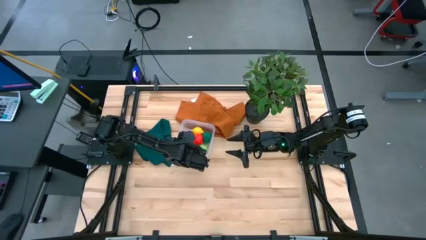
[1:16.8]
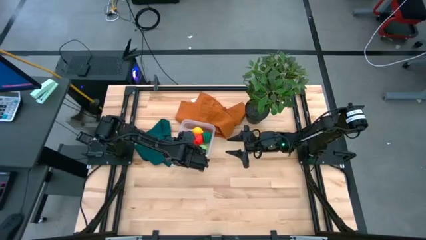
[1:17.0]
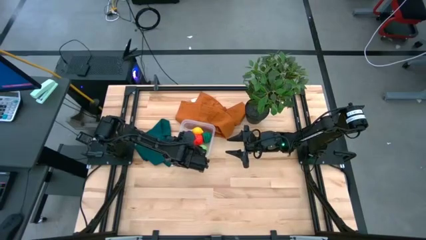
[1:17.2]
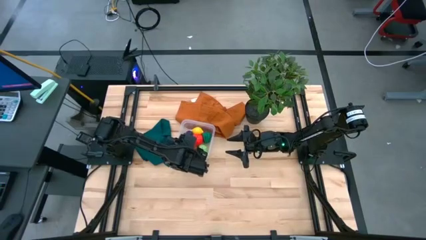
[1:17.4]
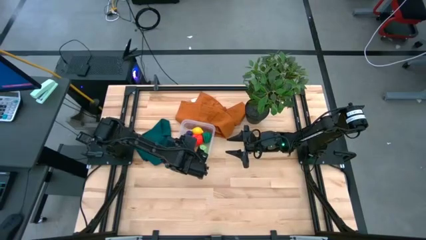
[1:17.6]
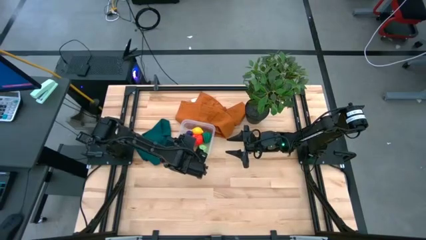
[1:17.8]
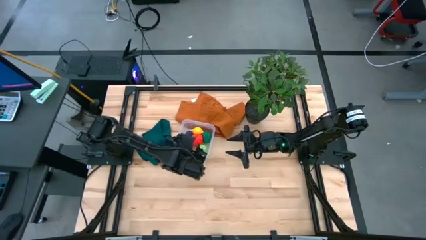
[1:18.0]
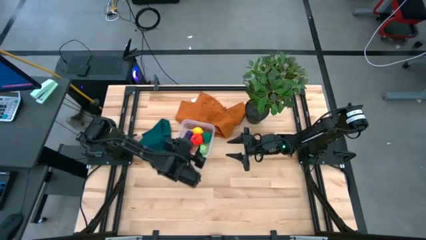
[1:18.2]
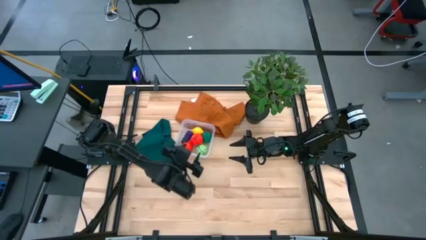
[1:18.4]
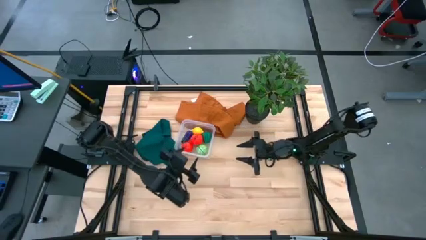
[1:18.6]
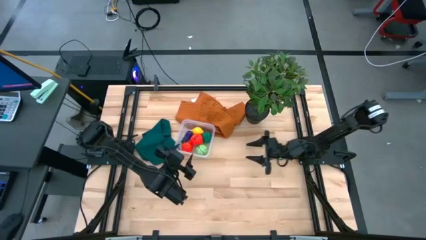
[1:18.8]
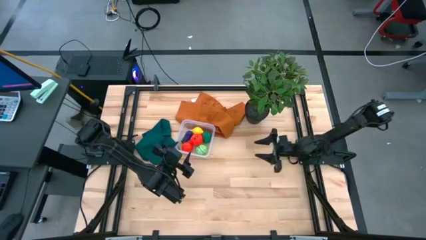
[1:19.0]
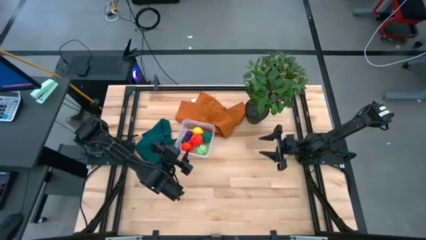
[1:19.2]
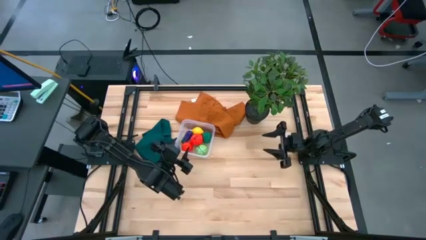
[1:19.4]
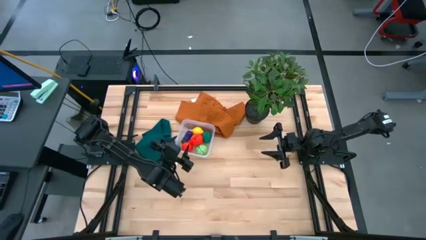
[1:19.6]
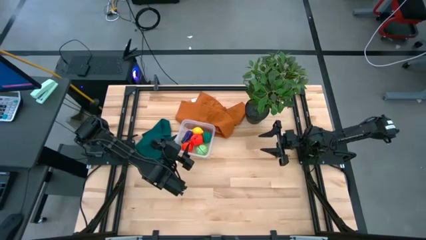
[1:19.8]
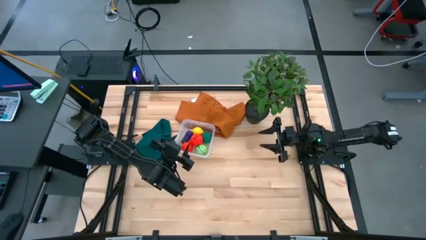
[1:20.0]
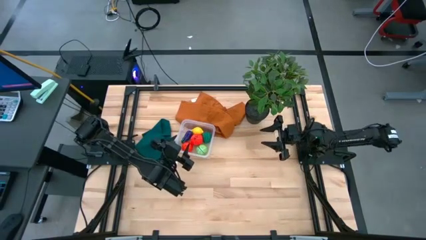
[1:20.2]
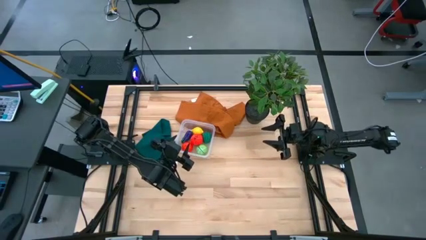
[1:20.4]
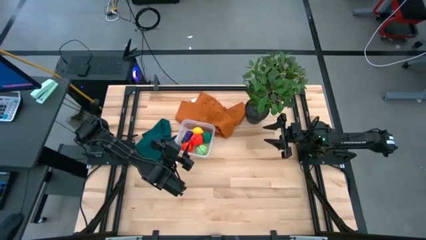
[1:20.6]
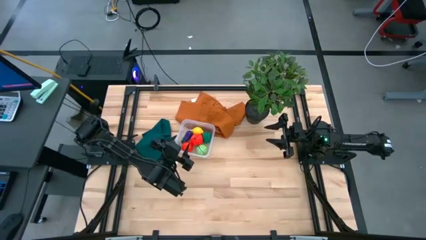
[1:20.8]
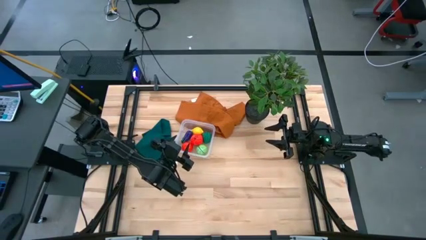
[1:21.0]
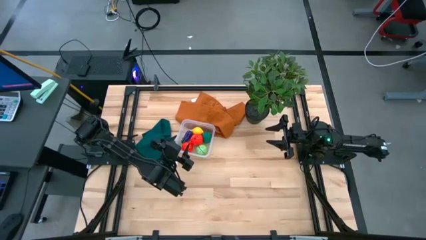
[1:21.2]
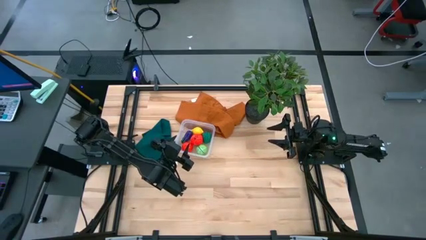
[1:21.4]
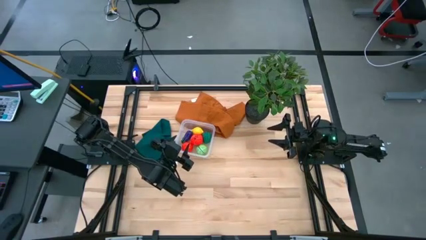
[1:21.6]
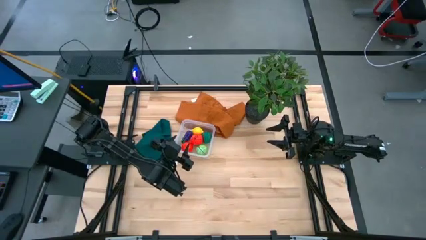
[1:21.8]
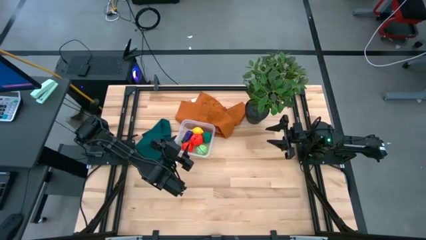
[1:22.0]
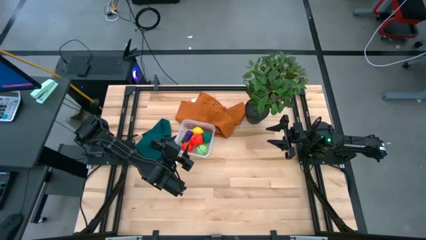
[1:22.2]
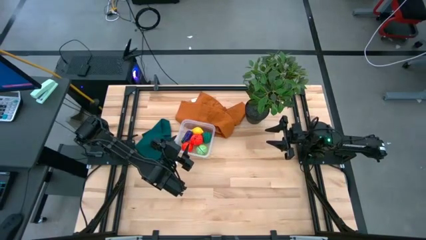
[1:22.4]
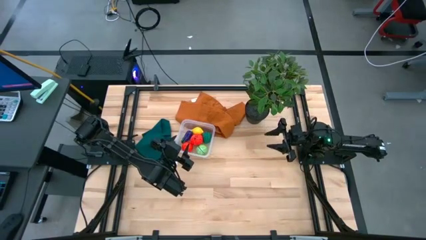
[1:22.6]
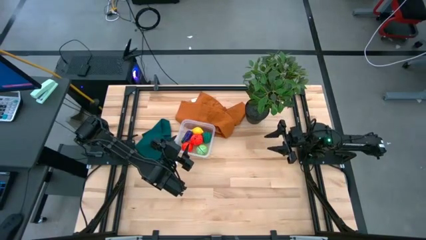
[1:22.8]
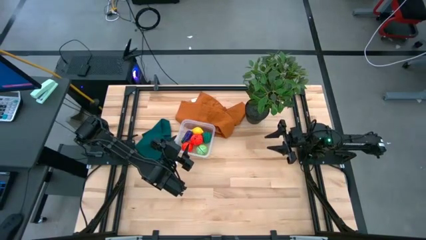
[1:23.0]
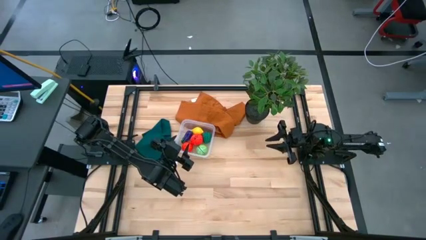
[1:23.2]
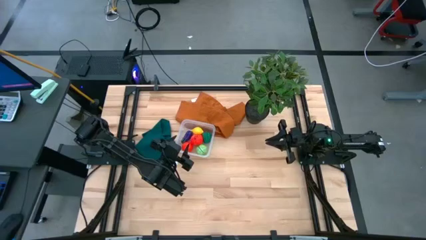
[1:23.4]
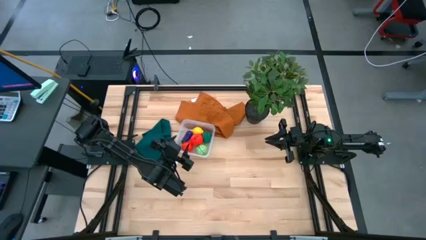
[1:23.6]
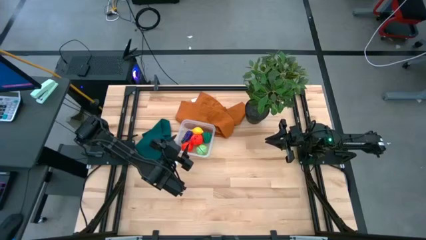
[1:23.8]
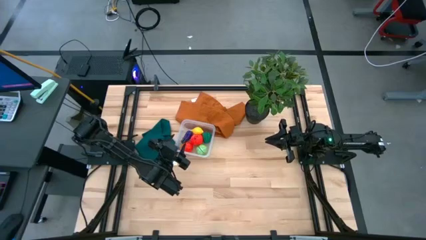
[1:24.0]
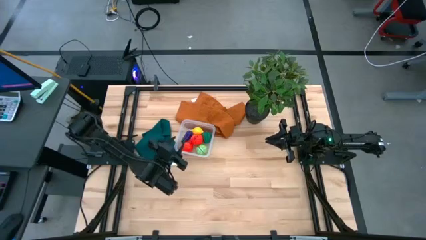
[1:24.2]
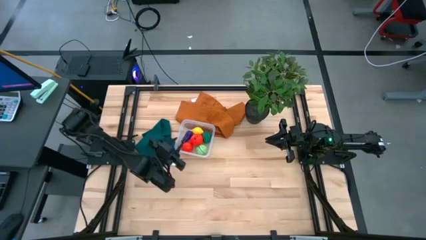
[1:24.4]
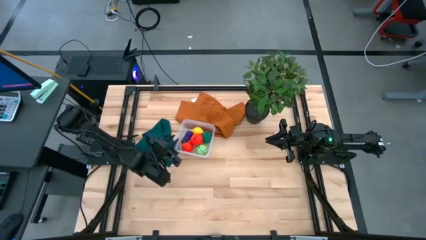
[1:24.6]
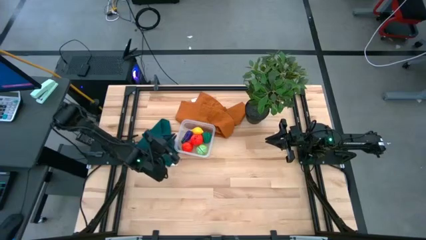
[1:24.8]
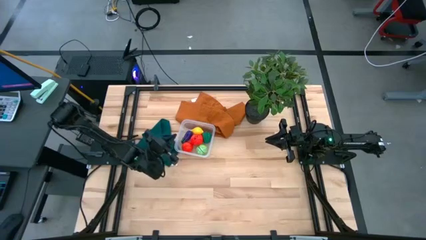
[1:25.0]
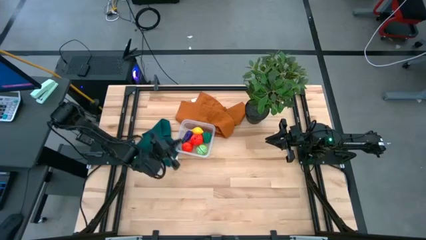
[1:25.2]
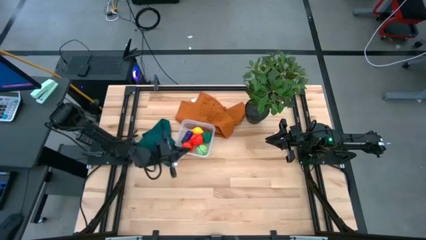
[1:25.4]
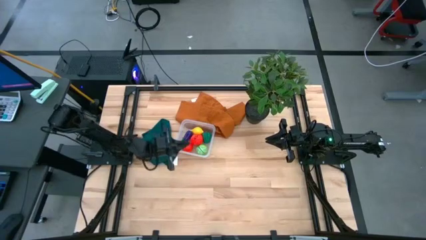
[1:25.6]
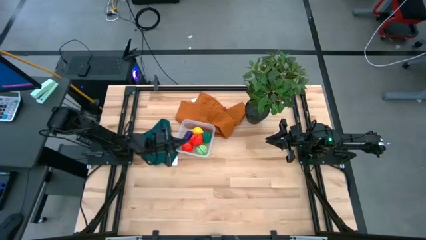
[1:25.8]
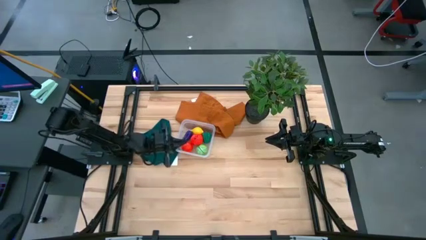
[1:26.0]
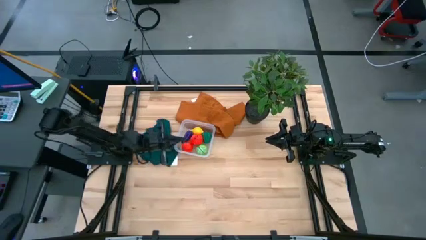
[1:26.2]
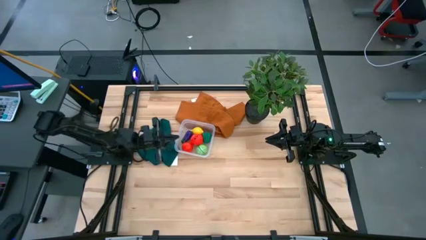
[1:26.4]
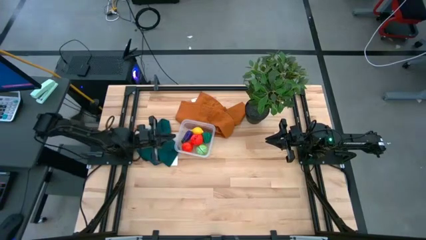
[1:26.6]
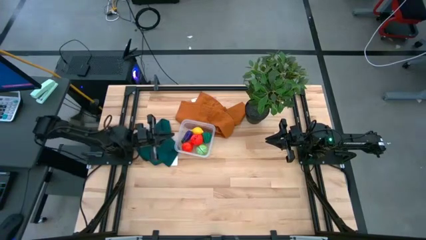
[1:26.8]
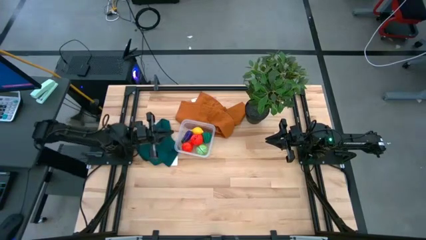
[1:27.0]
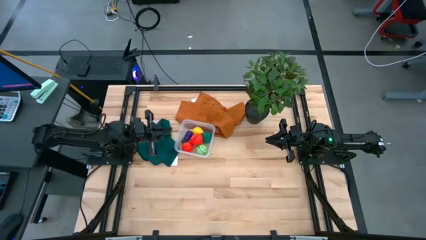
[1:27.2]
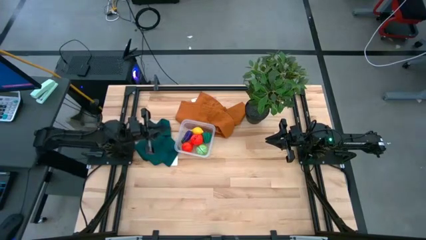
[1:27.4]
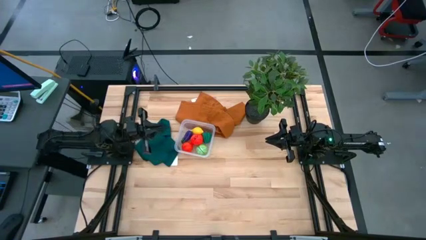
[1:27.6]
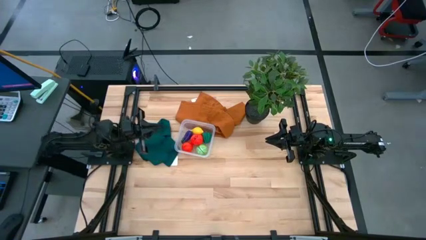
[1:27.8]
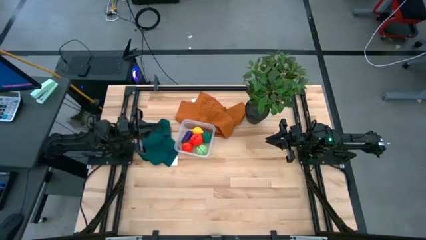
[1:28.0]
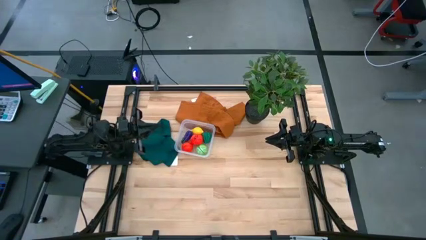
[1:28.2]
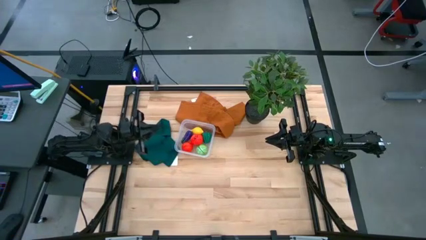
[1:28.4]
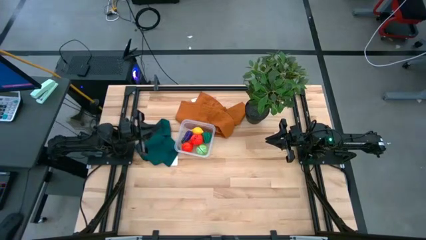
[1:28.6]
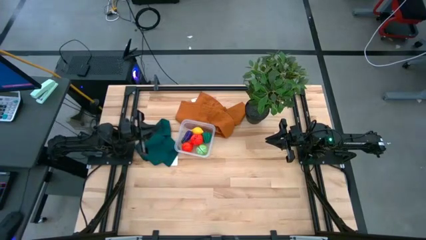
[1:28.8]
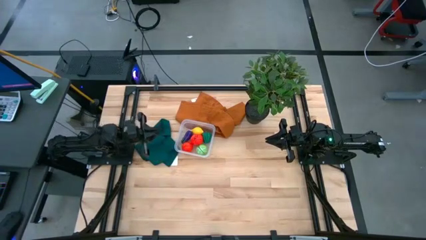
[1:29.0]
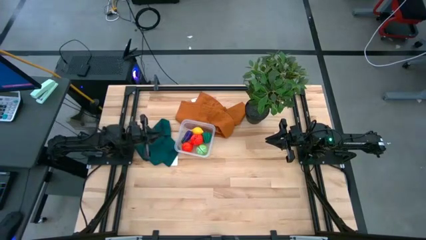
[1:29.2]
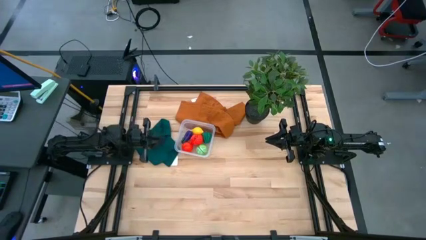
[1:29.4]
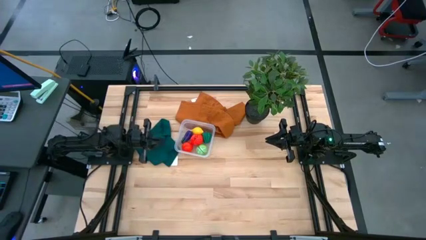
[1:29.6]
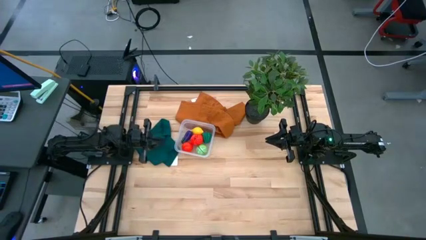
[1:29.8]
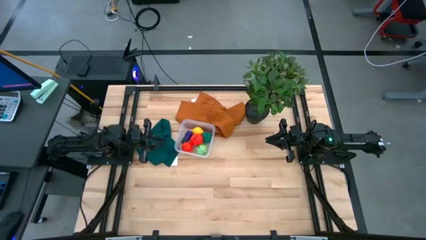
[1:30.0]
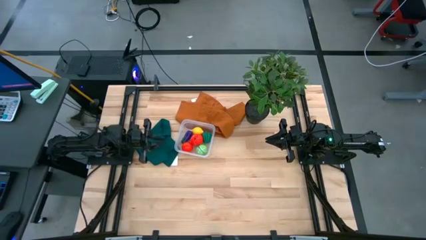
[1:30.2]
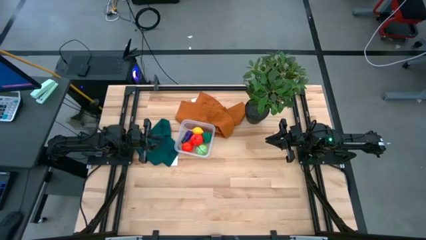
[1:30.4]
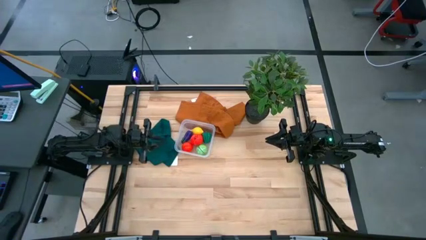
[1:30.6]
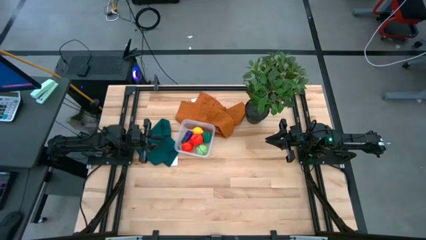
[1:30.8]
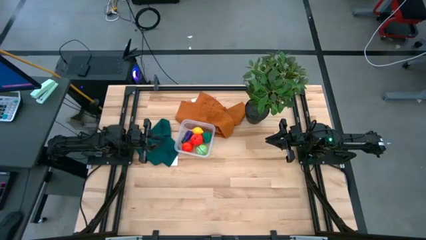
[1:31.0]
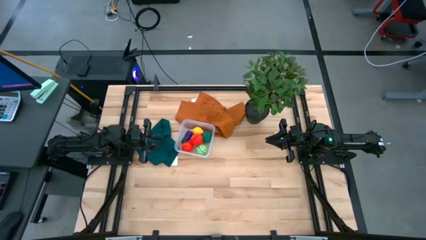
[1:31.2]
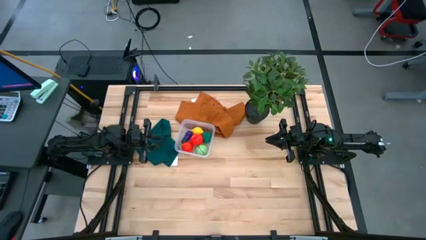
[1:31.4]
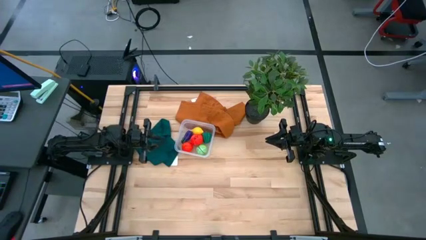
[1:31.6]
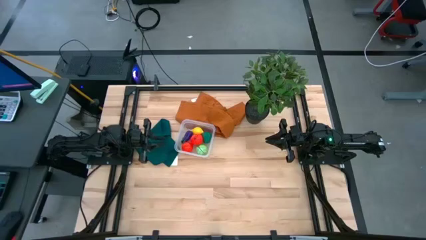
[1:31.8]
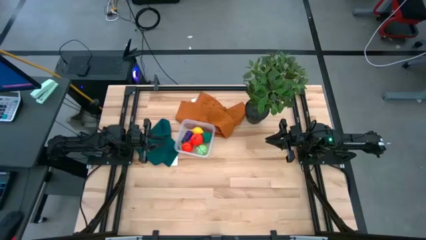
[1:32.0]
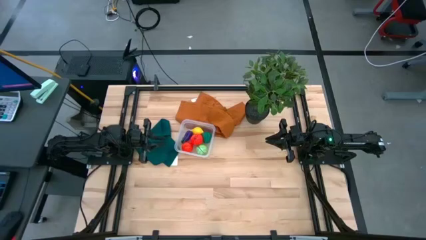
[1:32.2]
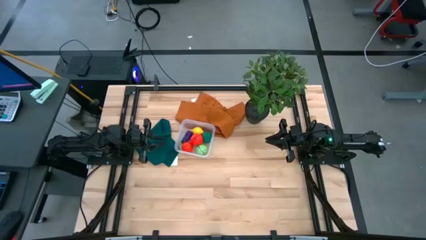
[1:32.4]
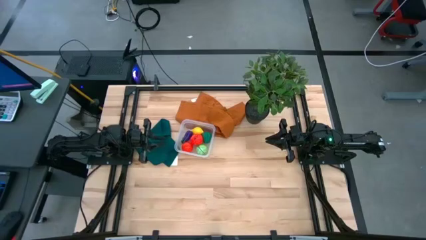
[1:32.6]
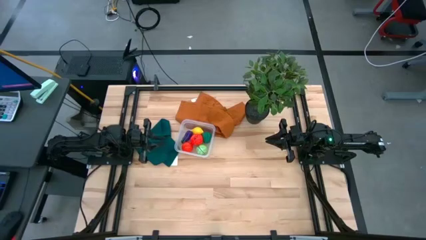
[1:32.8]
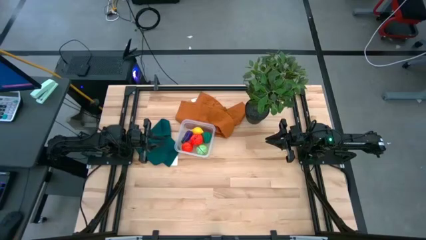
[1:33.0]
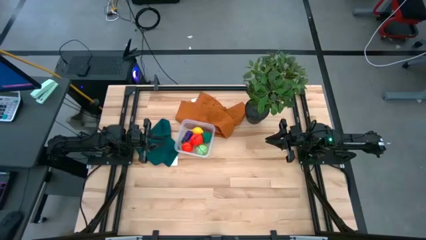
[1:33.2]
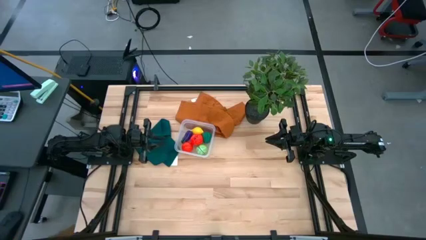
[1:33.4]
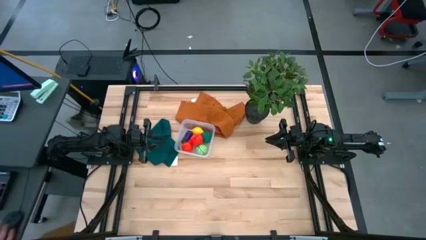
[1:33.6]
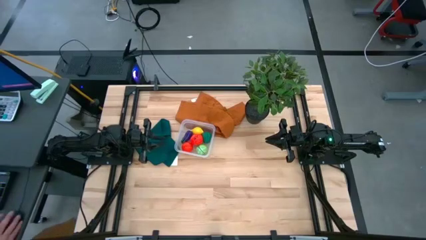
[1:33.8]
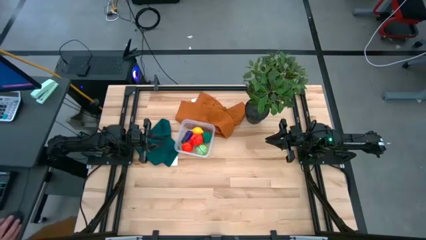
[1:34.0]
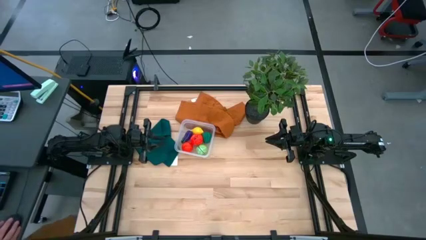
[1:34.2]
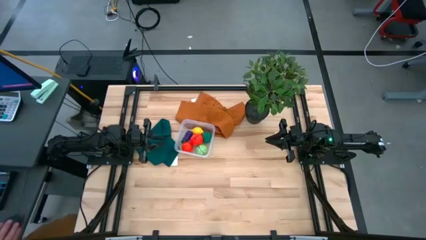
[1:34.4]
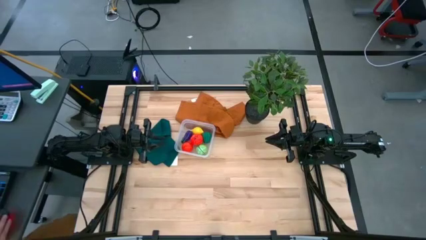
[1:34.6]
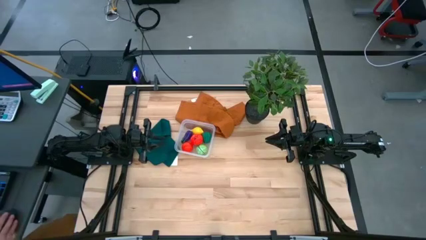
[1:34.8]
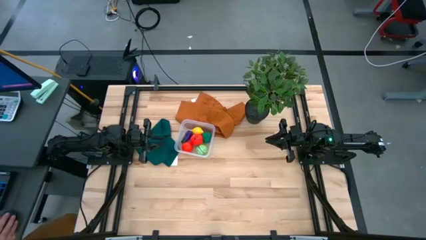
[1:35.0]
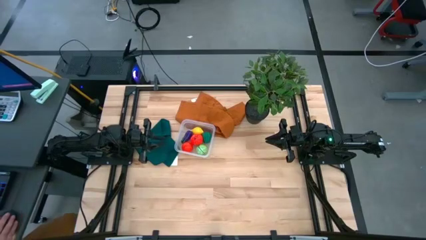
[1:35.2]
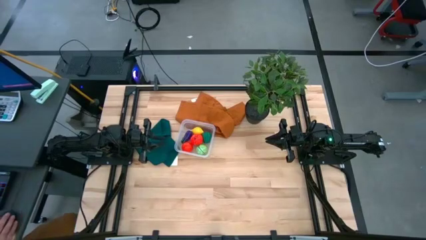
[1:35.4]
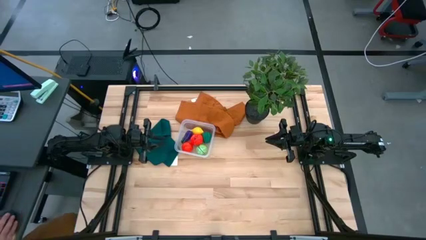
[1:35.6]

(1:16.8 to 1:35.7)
Task: Pick and placing Produce into tupperware
Return to Home Position
